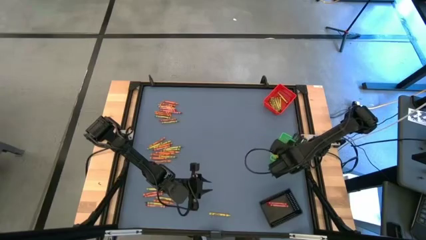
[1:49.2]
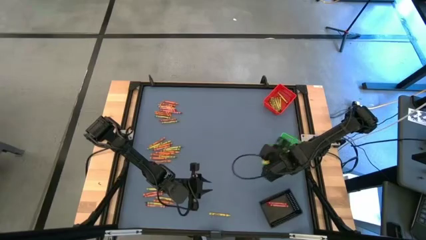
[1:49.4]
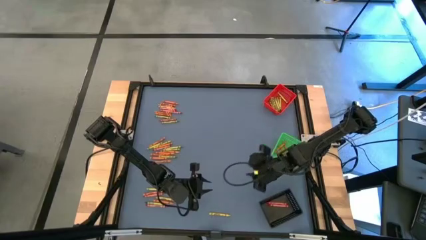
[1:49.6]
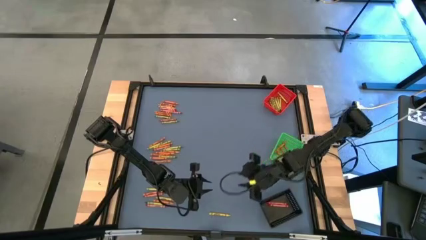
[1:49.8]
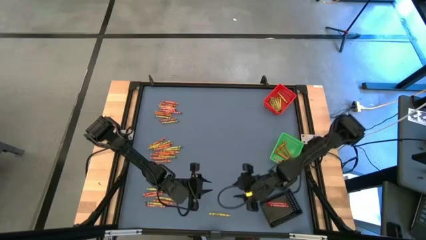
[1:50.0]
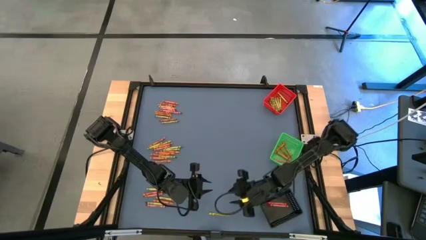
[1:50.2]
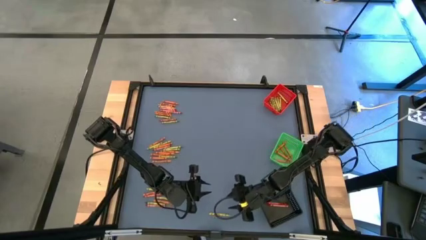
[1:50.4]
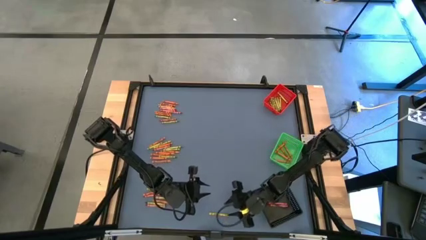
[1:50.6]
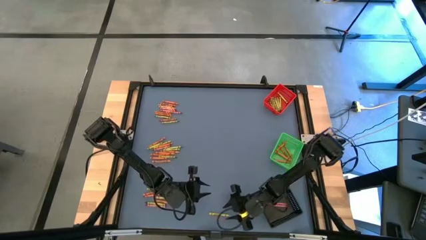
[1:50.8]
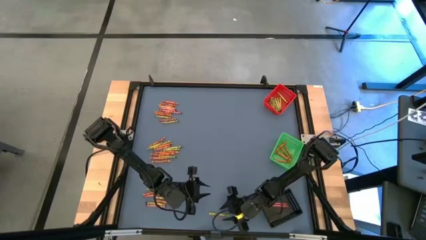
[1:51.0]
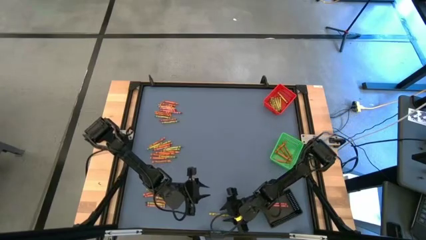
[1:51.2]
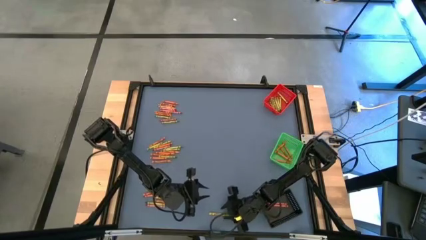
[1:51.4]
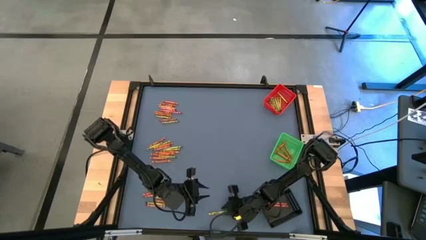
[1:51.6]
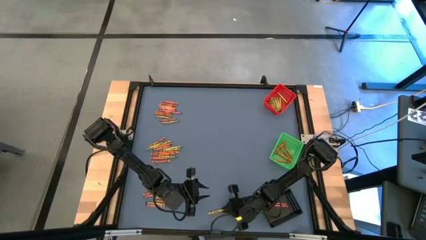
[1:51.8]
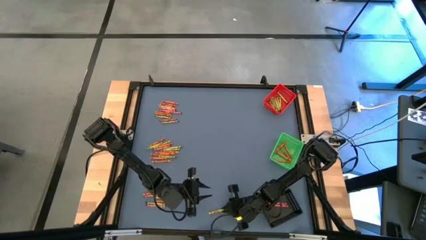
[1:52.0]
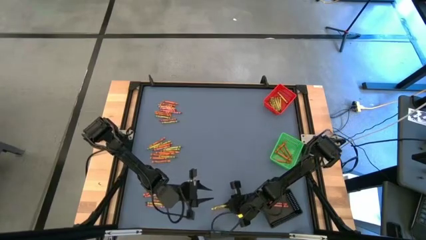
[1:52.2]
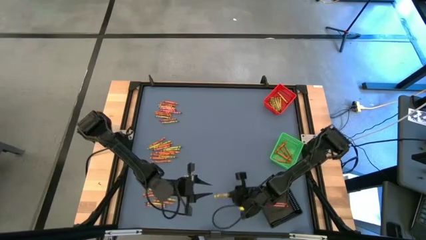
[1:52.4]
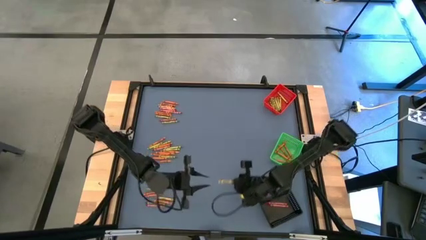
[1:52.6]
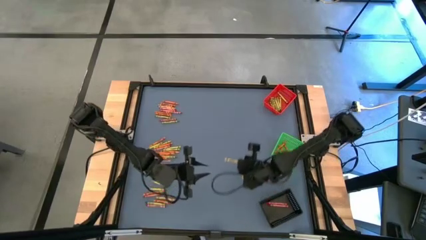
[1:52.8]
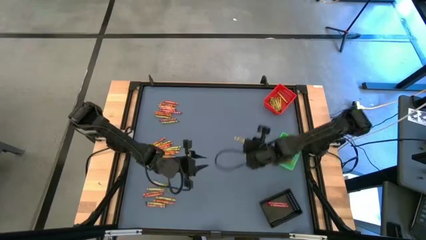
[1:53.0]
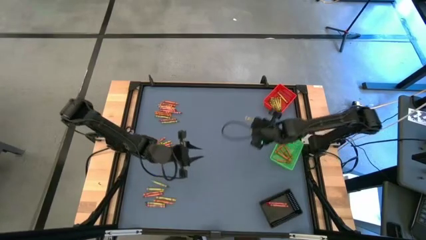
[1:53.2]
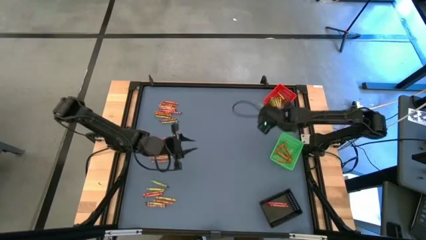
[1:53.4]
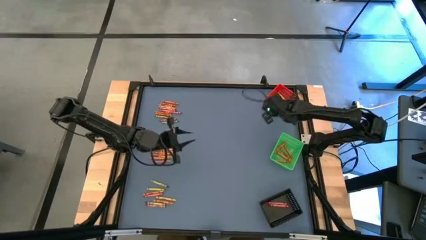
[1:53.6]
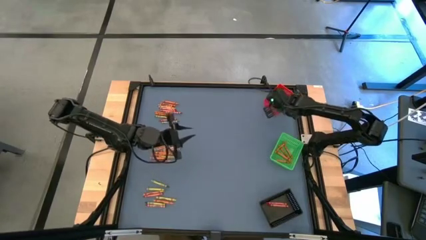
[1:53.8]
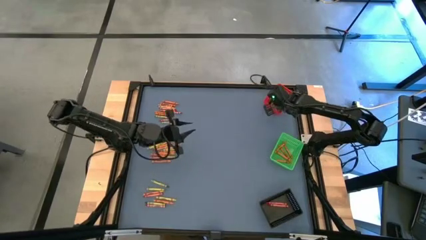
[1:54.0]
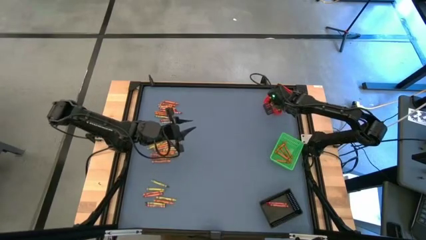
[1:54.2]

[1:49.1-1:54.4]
Task: Sort crayons
Put the light green crayon into the red bin

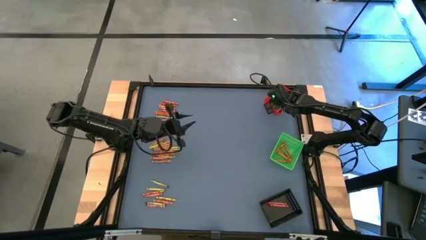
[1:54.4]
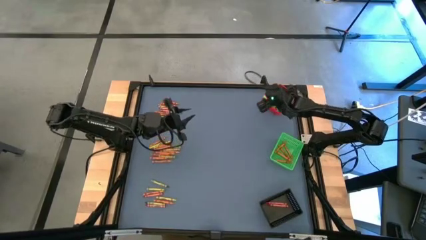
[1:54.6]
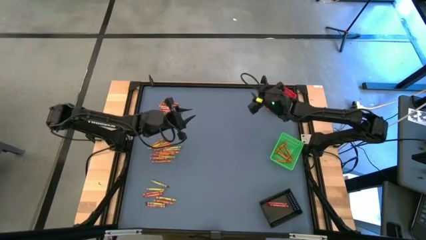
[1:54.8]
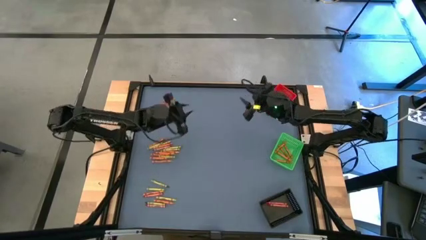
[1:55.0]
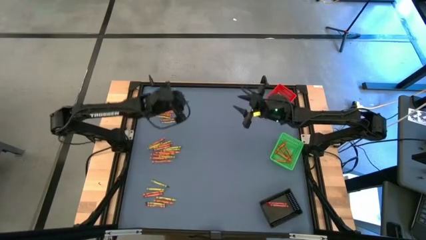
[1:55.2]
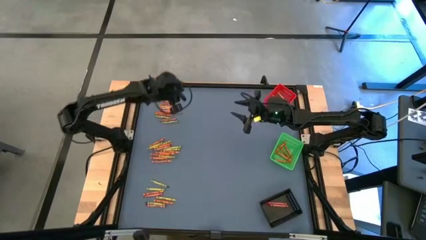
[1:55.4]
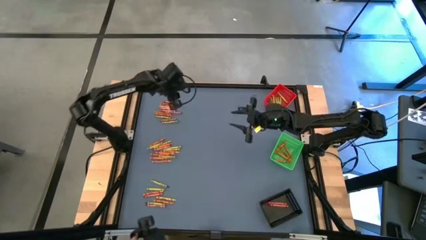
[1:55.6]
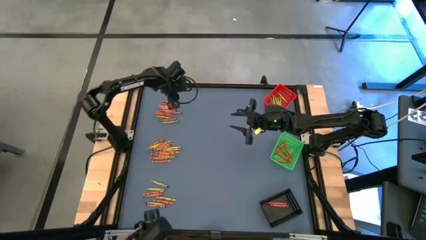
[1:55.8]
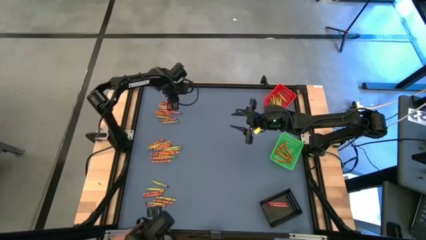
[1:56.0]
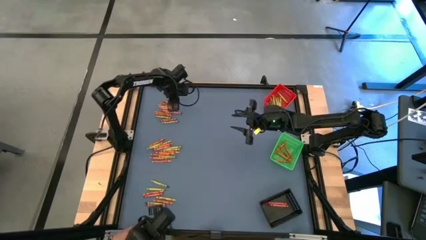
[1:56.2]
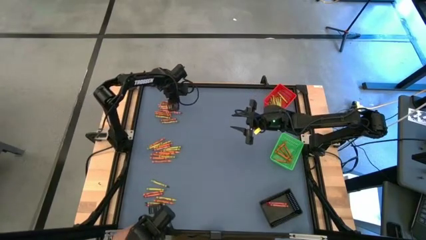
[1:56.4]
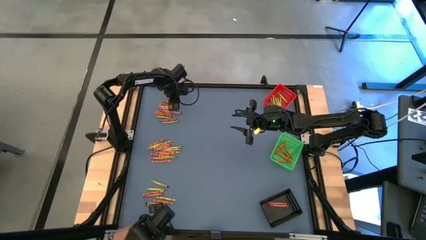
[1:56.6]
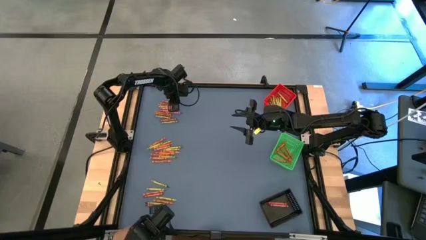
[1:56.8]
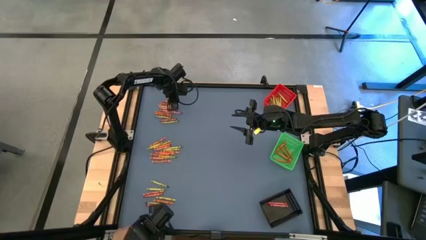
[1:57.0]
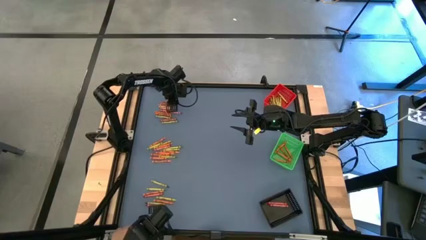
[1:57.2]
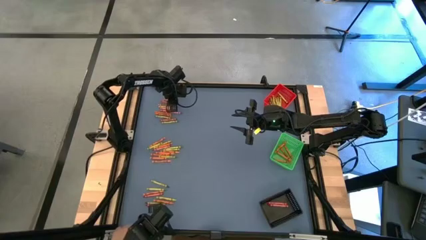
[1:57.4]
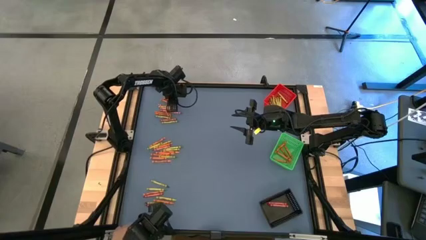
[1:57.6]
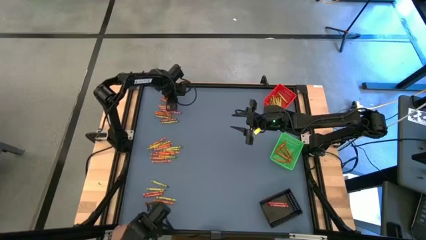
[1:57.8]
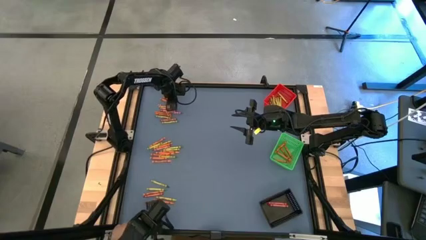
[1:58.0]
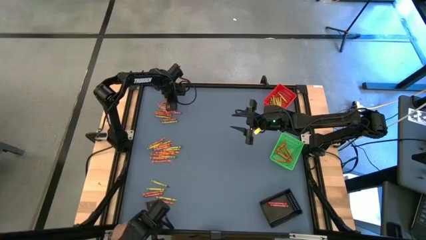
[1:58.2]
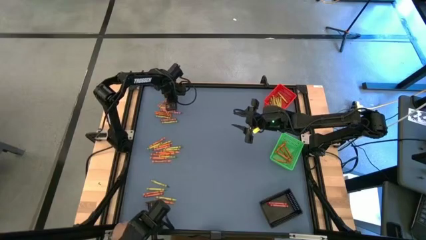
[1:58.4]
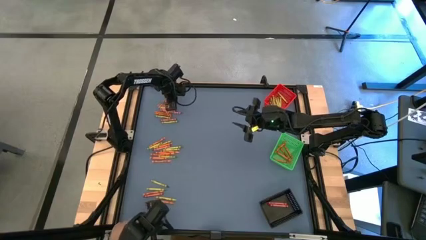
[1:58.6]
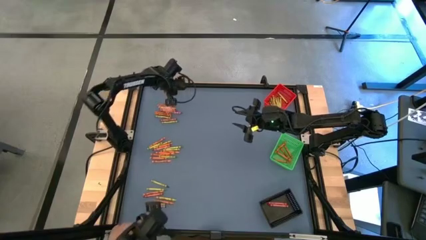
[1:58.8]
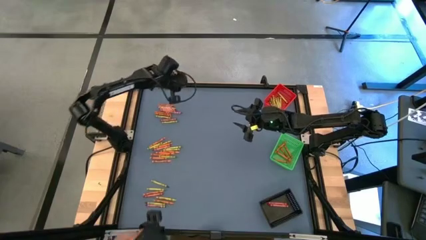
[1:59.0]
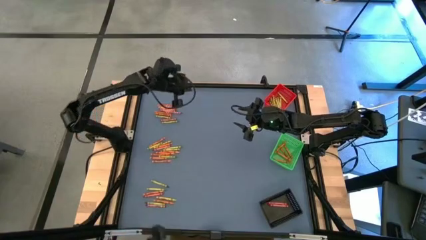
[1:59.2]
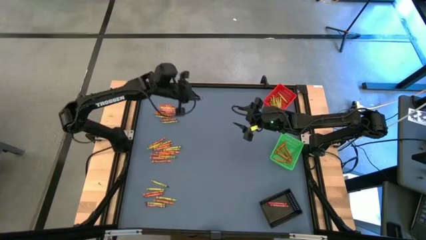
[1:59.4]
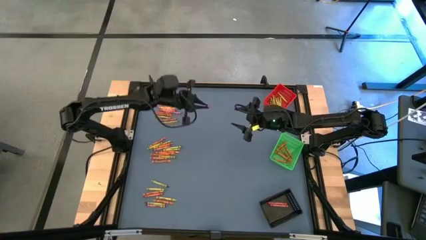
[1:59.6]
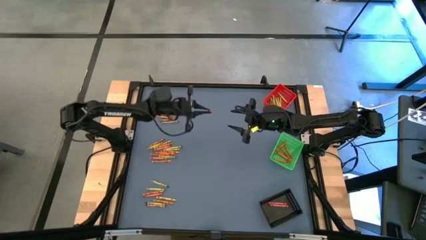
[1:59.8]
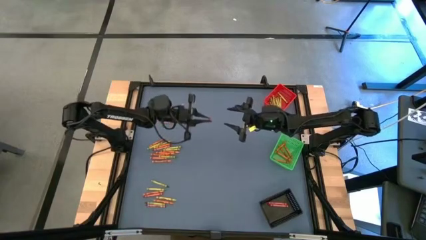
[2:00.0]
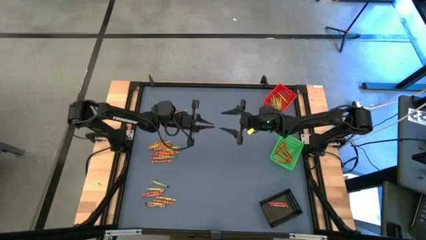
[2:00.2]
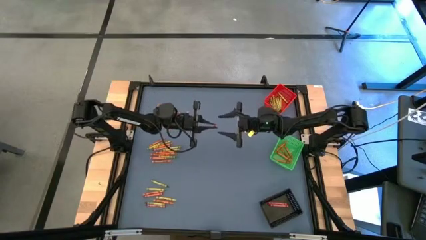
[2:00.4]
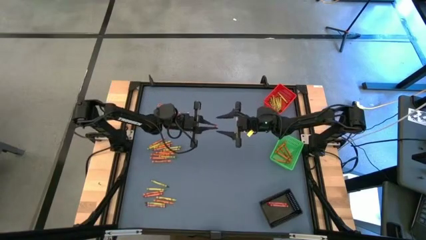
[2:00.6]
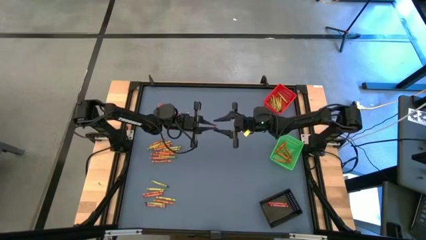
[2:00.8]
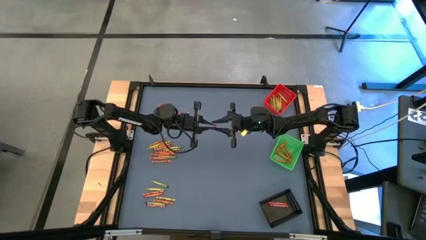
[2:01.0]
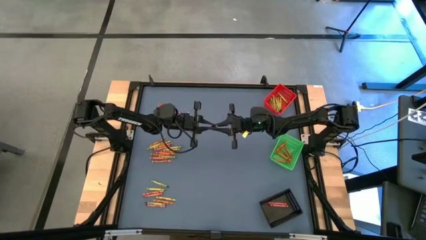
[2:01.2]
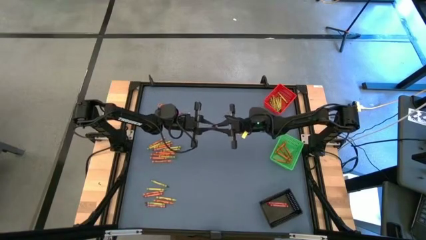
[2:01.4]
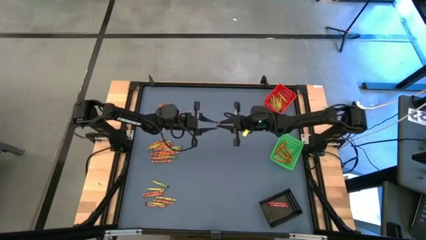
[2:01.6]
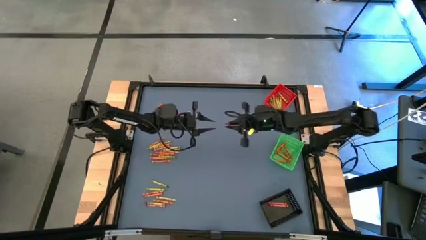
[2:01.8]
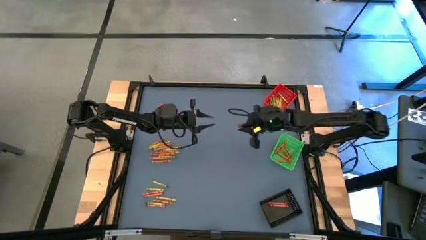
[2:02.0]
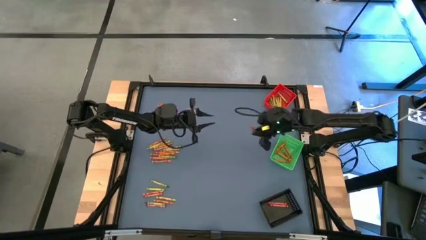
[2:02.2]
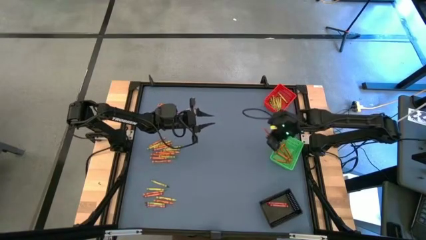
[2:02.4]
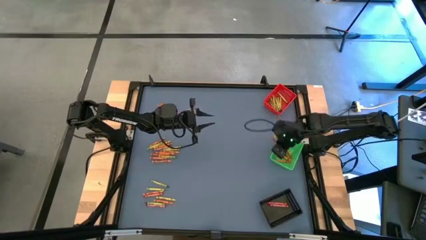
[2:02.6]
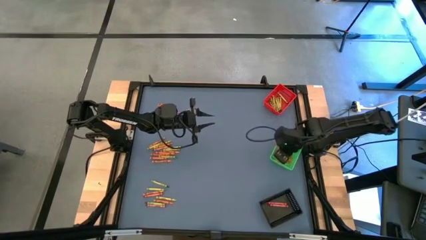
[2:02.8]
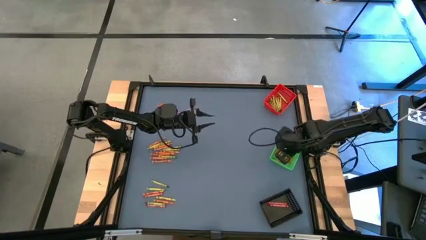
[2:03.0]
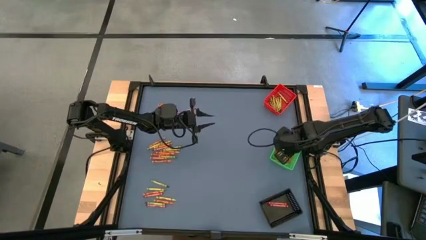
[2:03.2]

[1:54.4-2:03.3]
Put the orange crayon into the green bin
